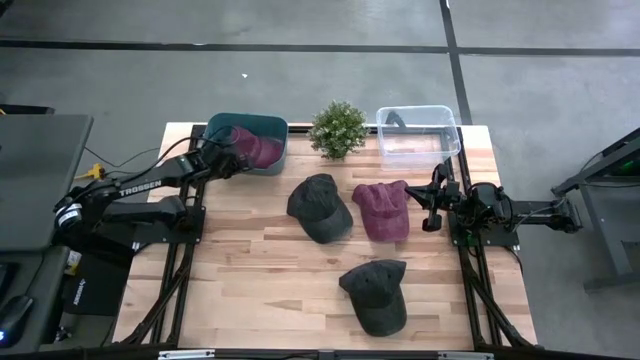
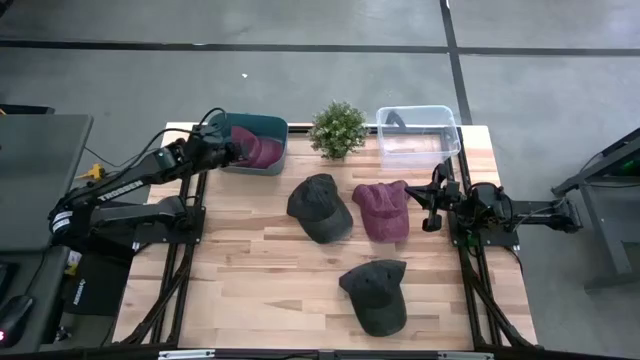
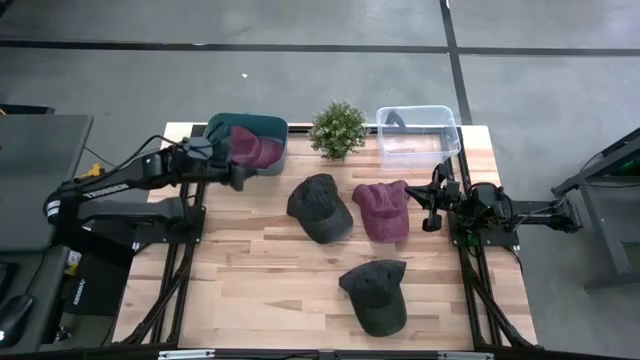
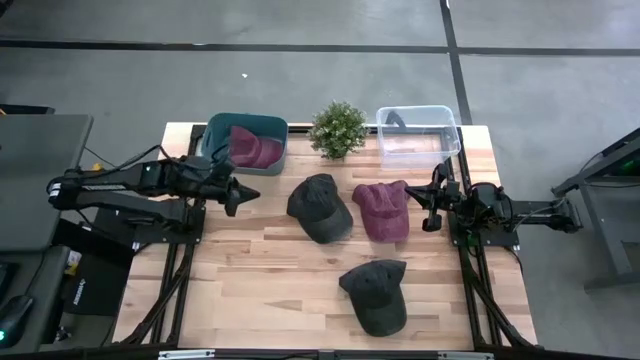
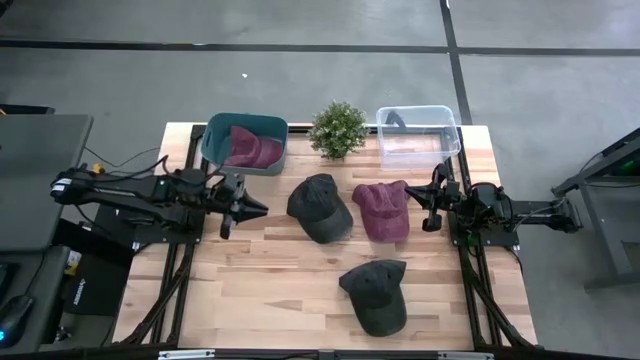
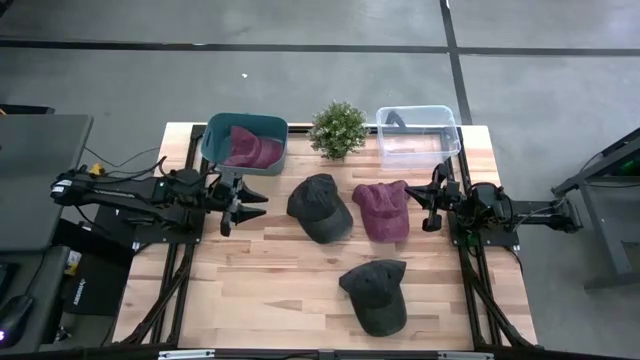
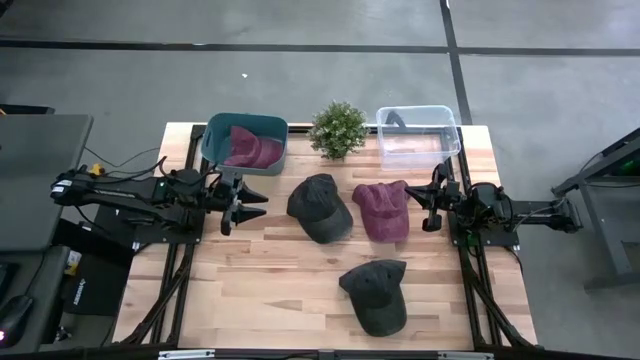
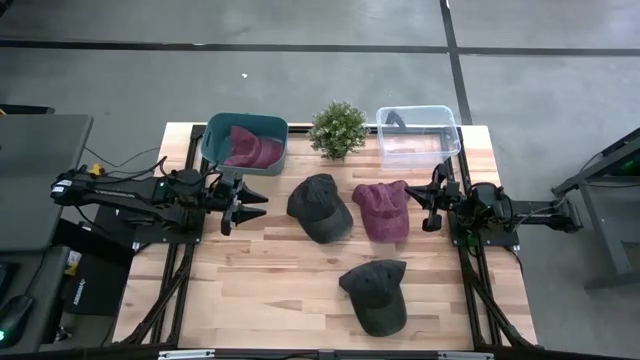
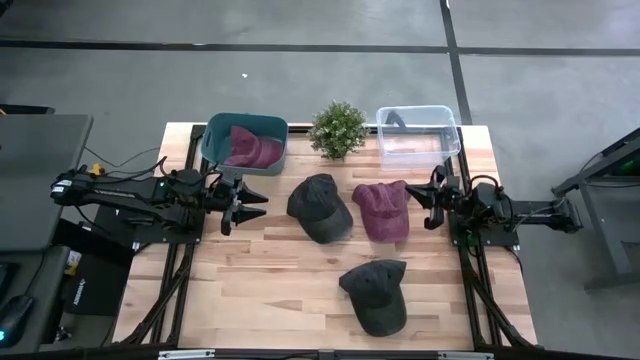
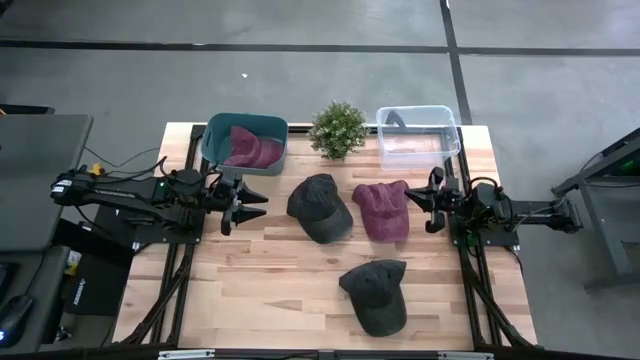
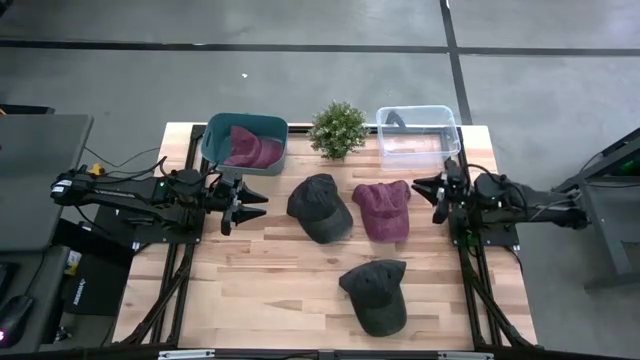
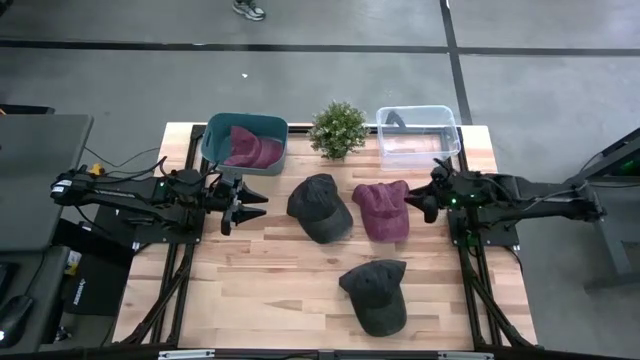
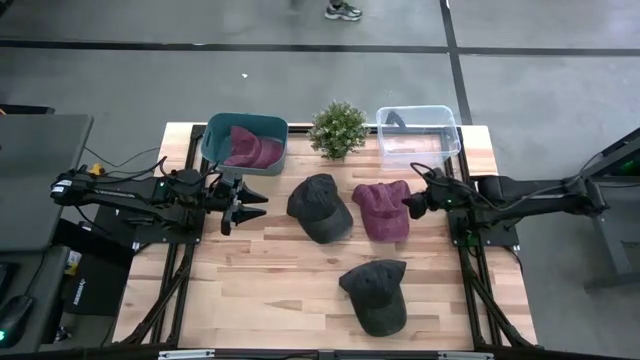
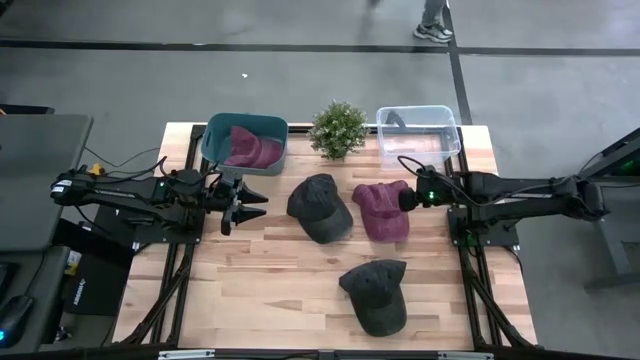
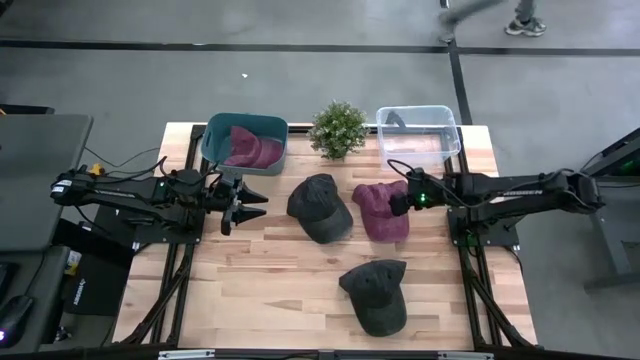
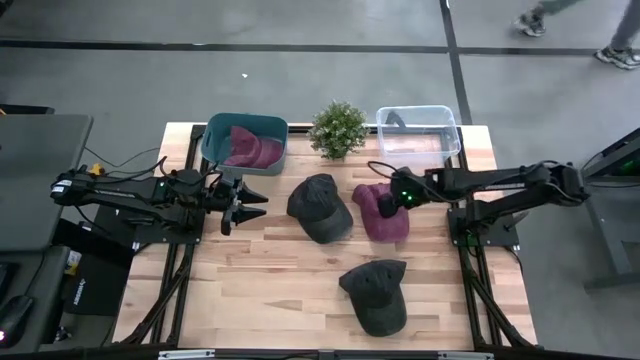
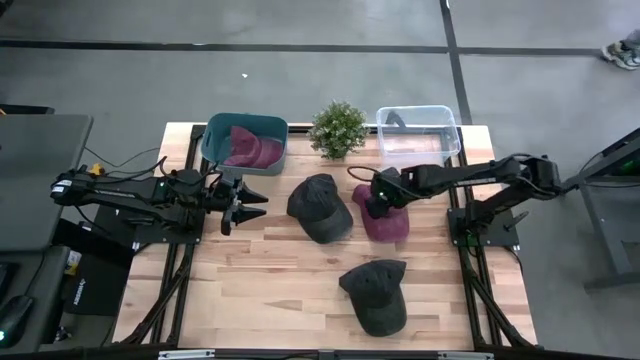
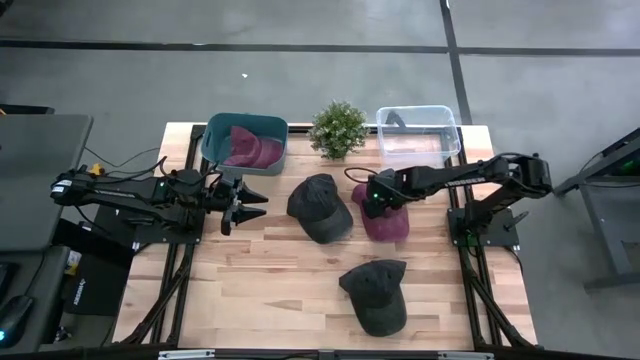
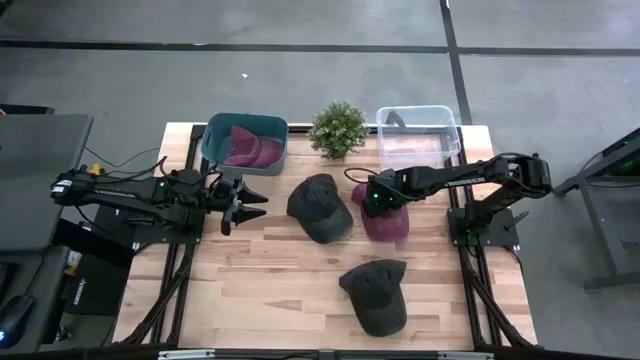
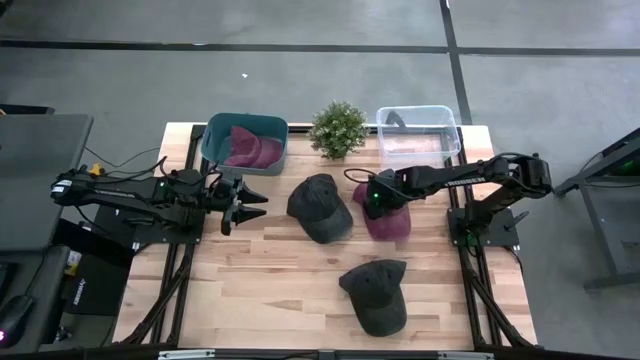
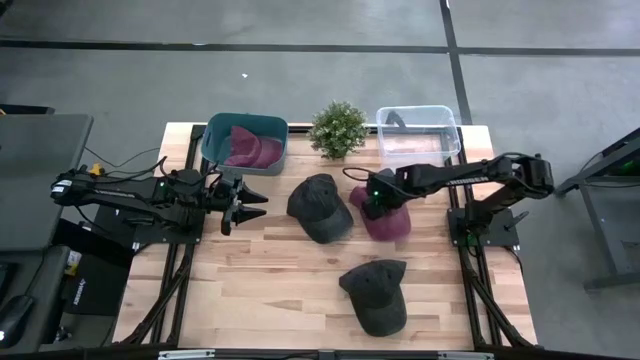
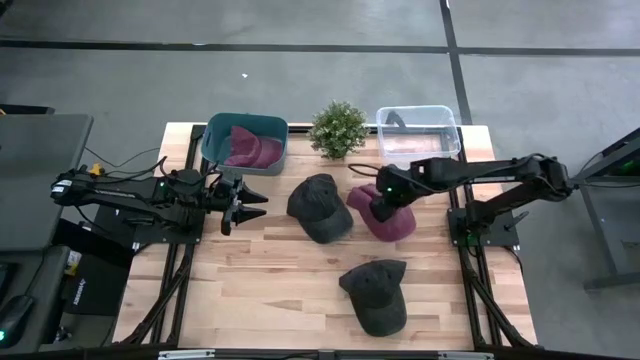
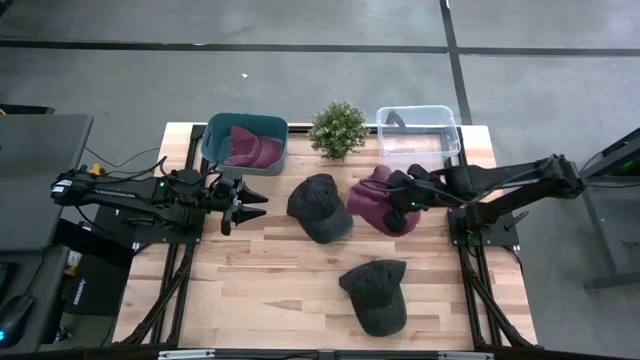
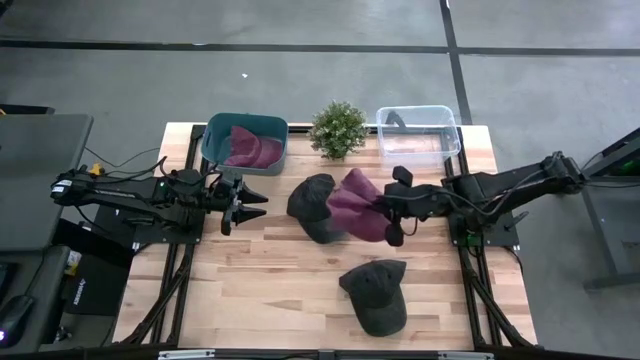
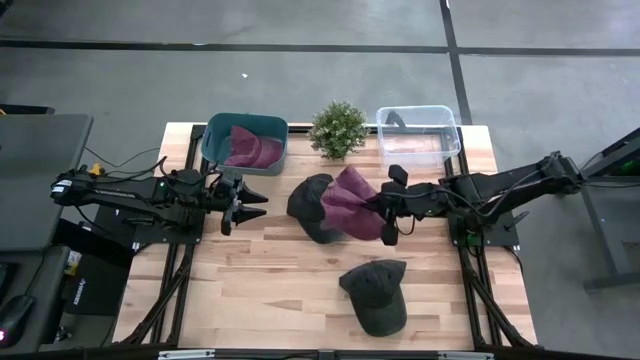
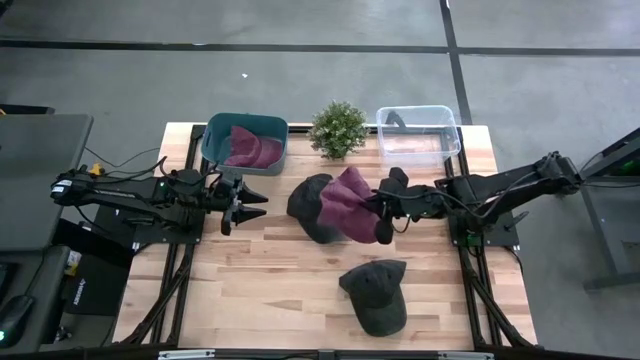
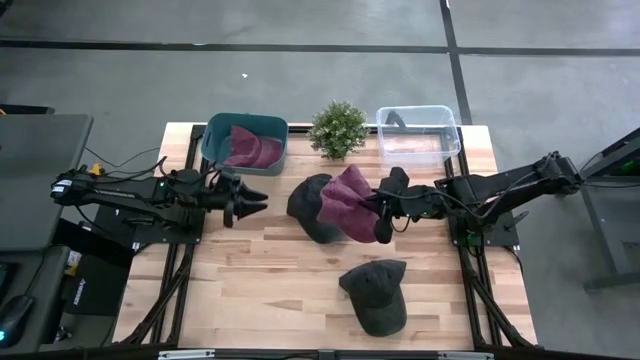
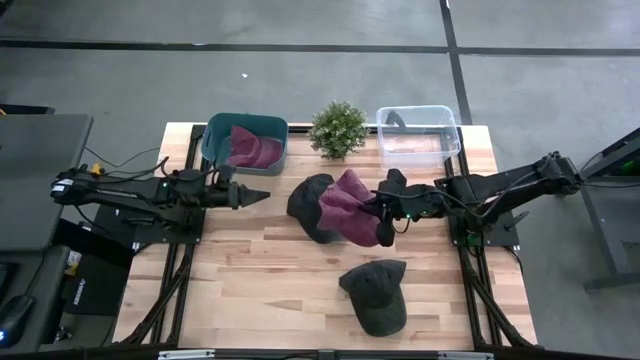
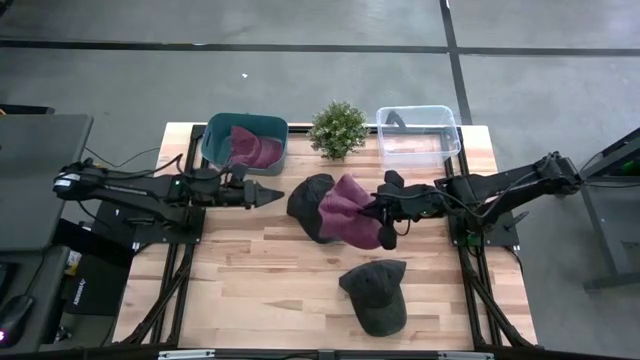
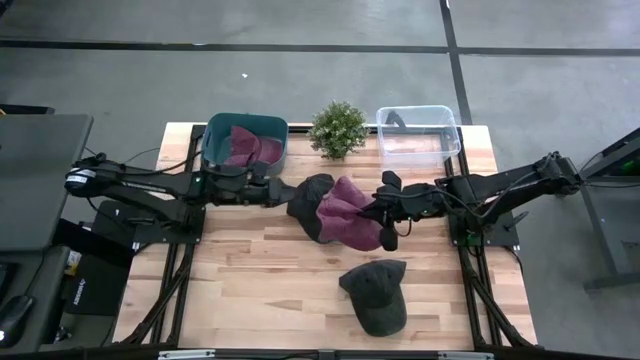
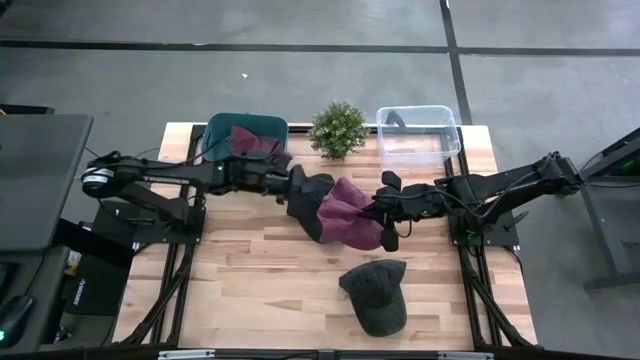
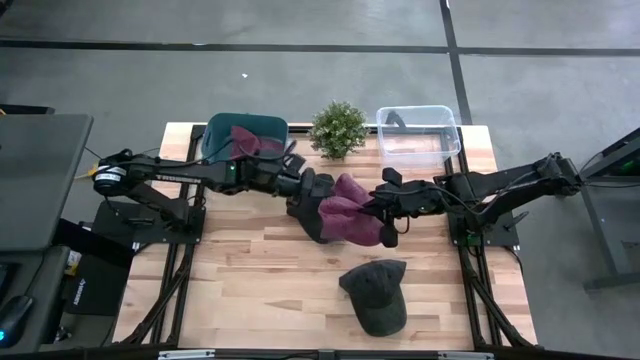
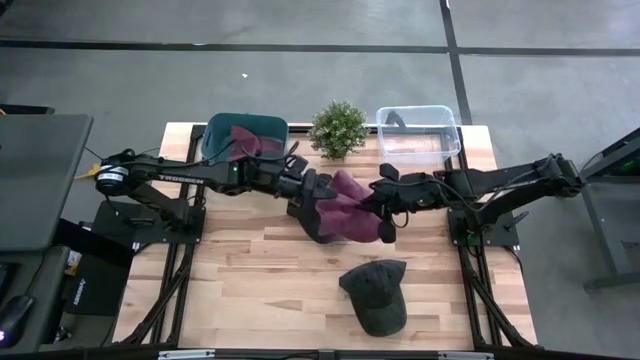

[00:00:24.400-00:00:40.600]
Task: Pick & Place hat
Put the dark red cap into the blue bin

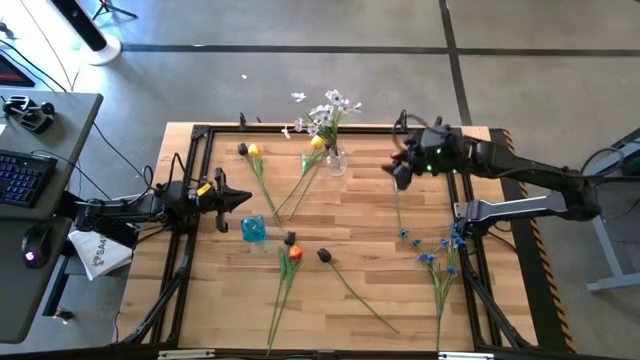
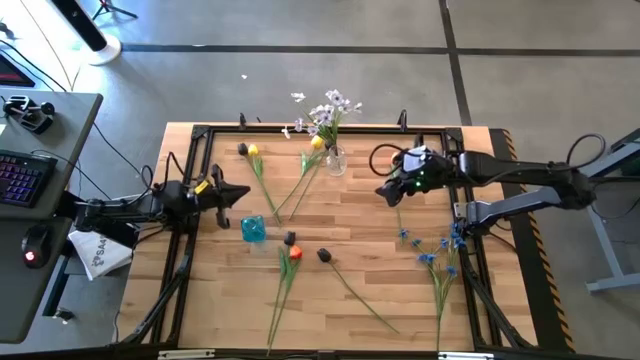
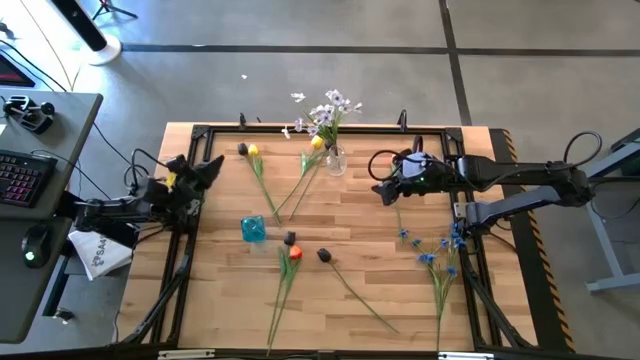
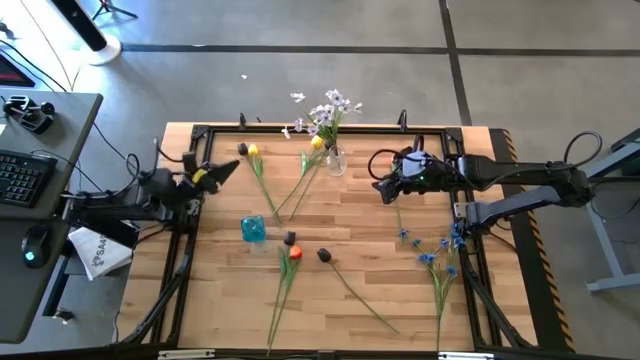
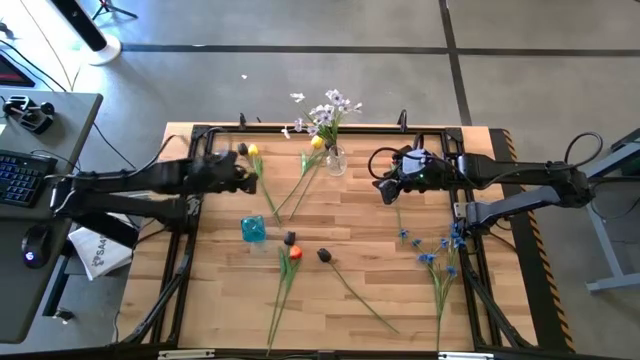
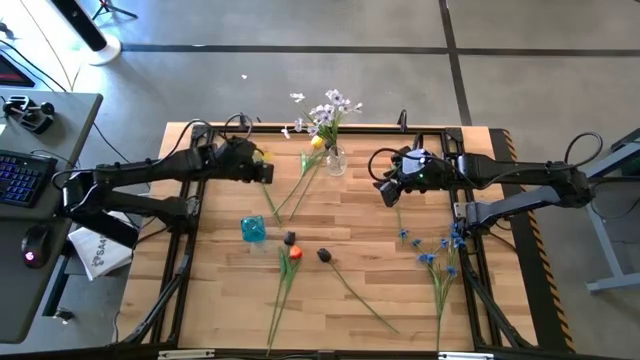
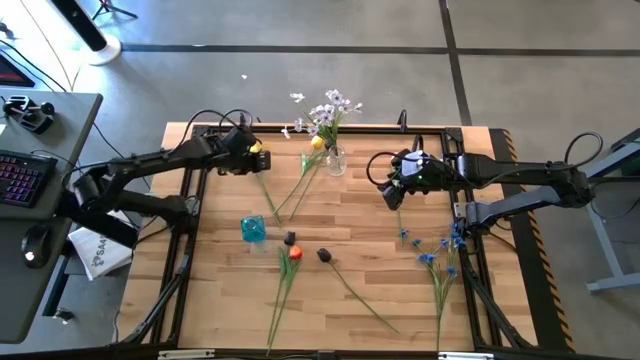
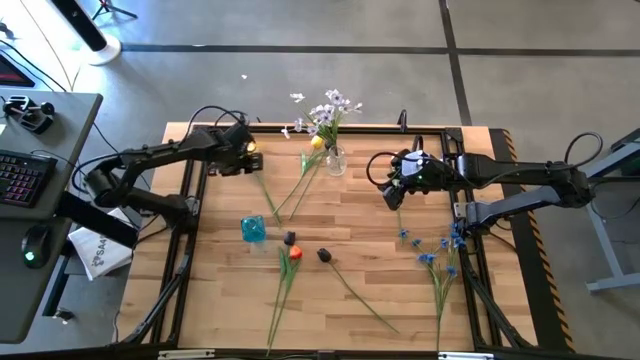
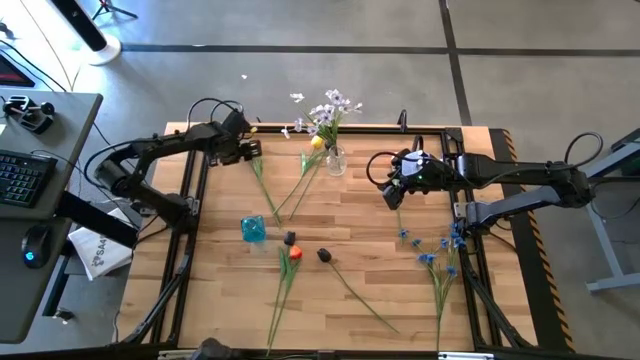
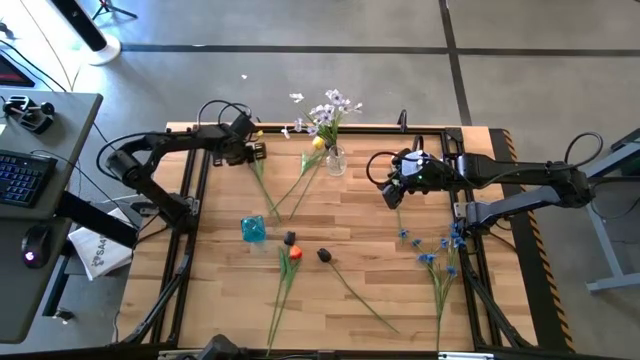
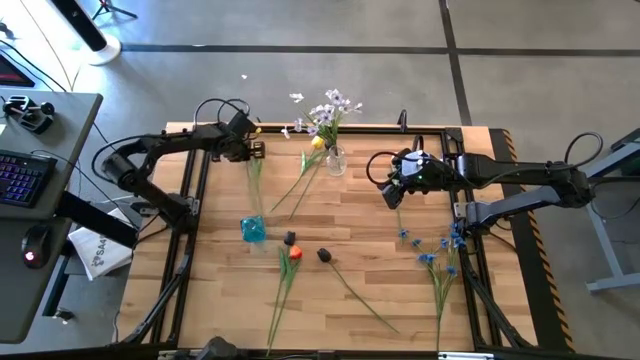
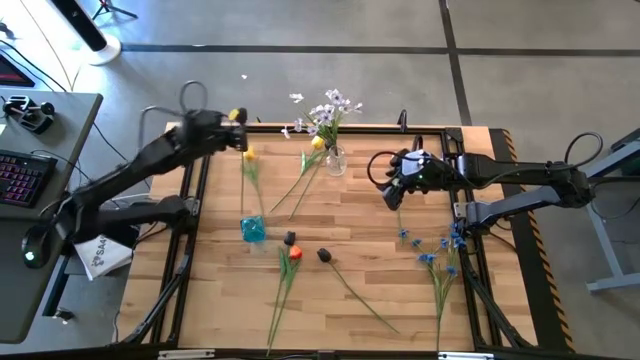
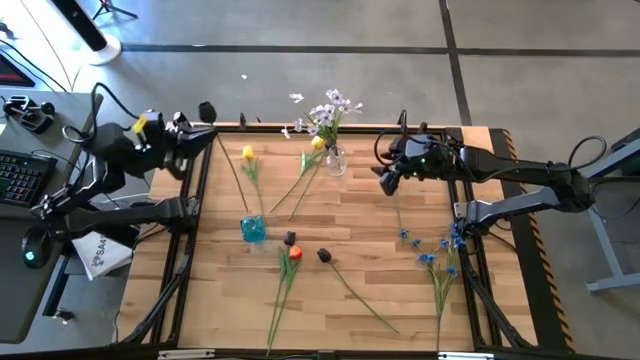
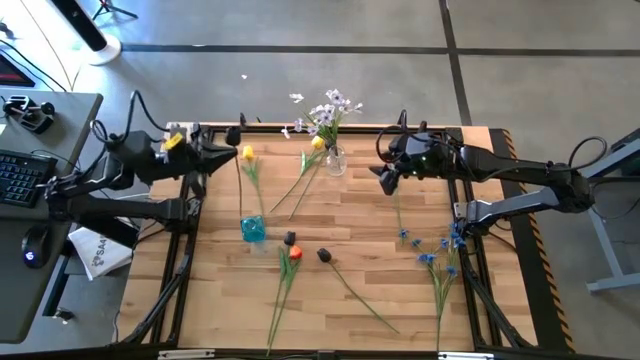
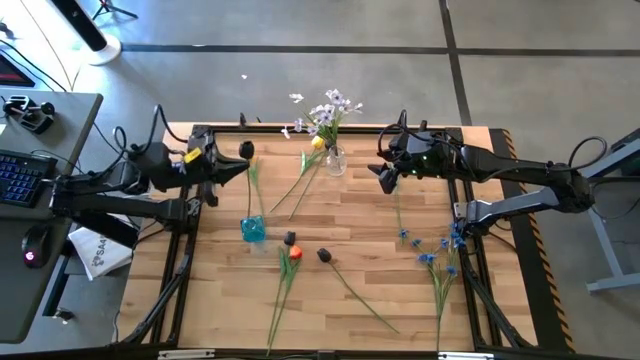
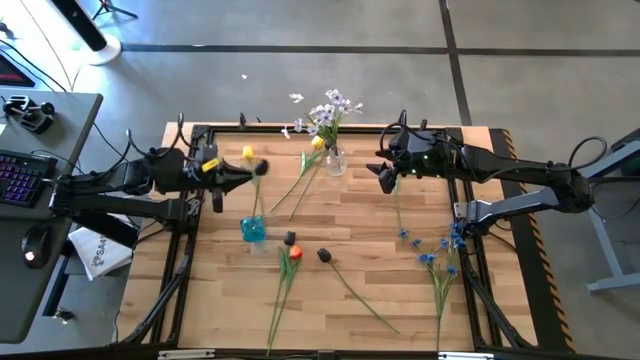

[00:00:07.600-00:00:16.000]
Task: Sort flowers into vase by color
Put the top left black flower into the blue vase
